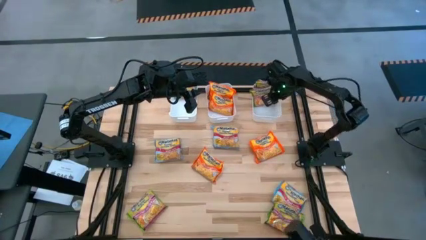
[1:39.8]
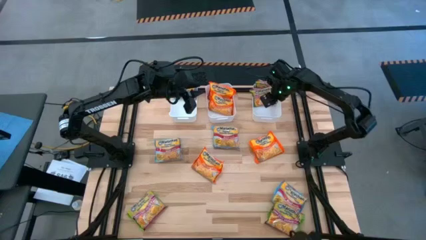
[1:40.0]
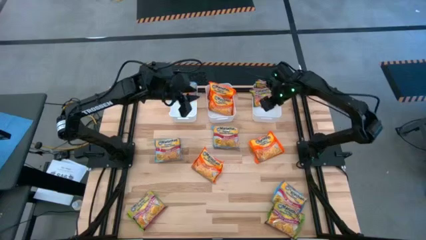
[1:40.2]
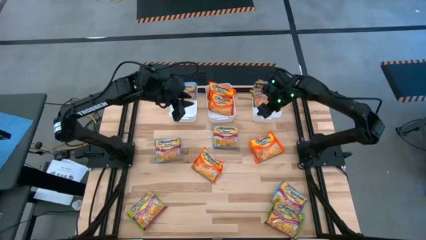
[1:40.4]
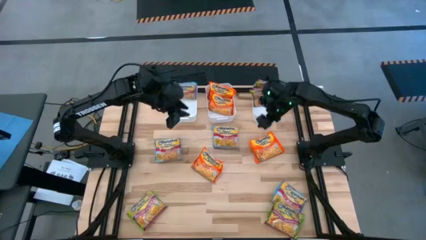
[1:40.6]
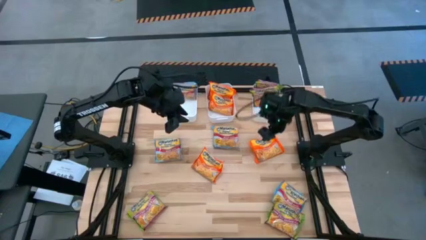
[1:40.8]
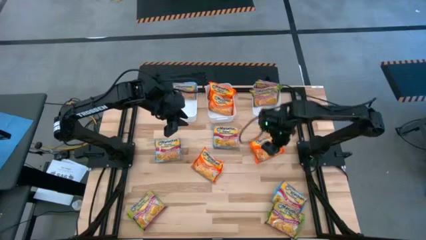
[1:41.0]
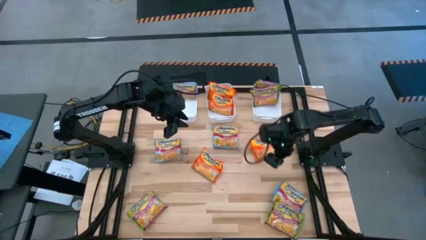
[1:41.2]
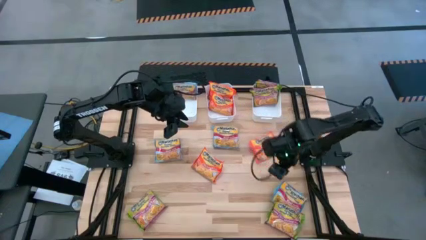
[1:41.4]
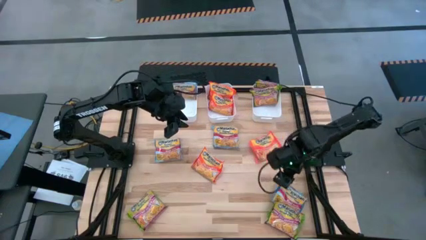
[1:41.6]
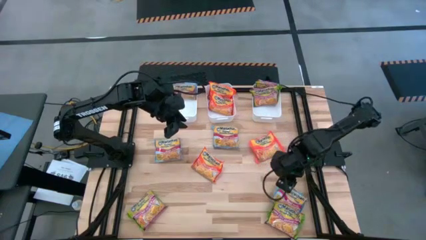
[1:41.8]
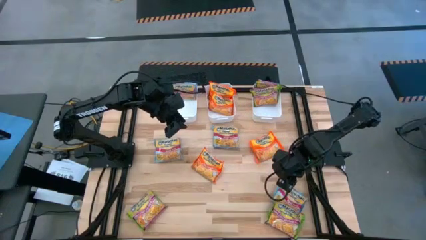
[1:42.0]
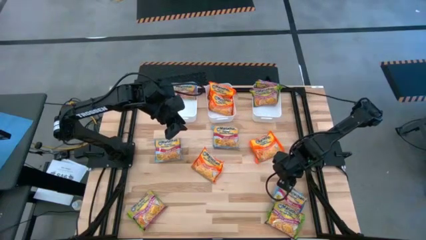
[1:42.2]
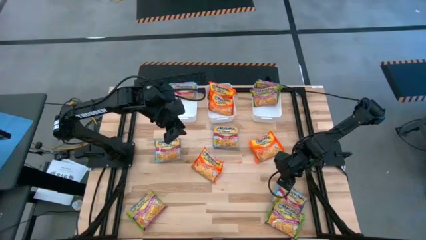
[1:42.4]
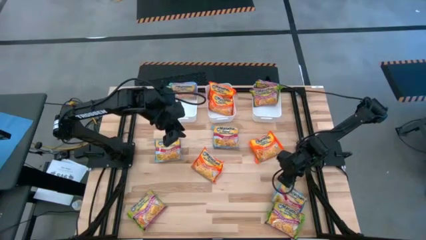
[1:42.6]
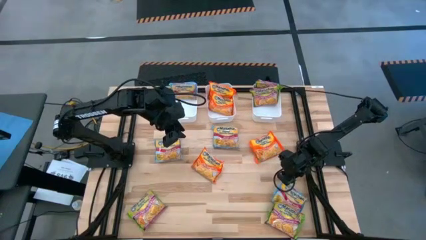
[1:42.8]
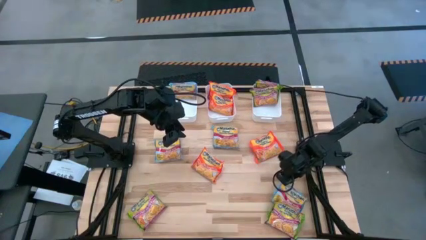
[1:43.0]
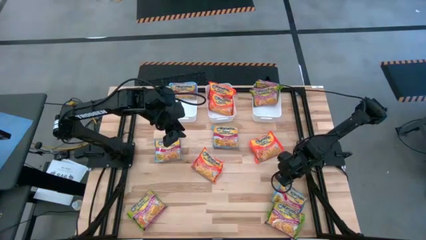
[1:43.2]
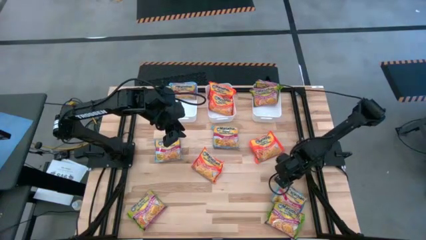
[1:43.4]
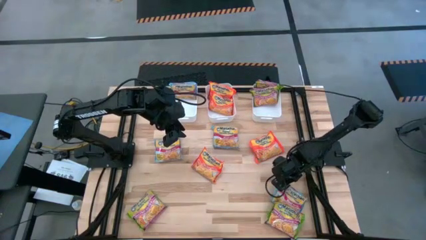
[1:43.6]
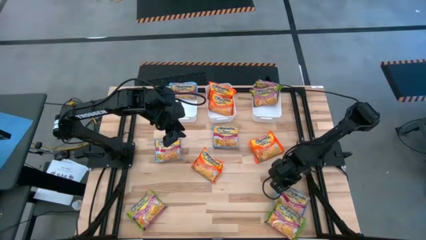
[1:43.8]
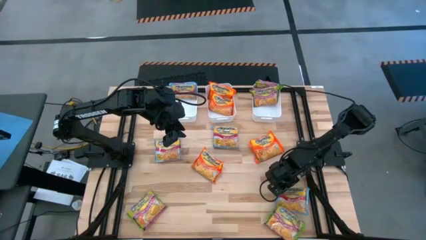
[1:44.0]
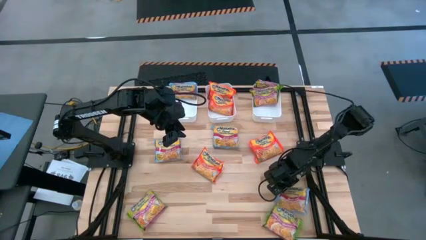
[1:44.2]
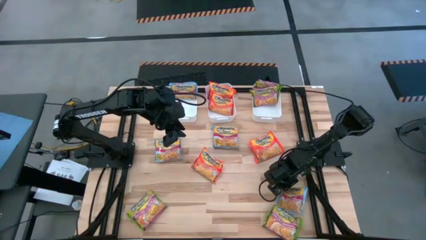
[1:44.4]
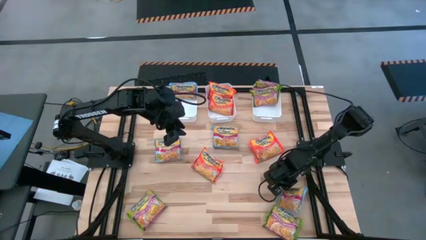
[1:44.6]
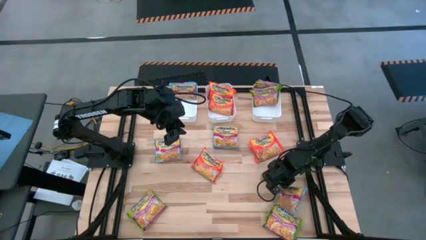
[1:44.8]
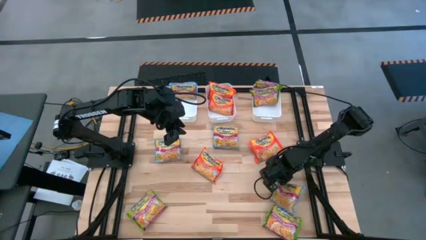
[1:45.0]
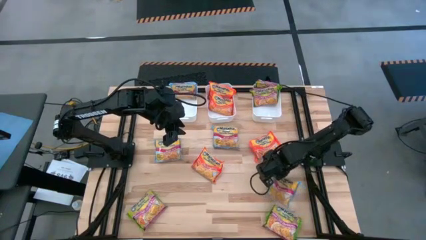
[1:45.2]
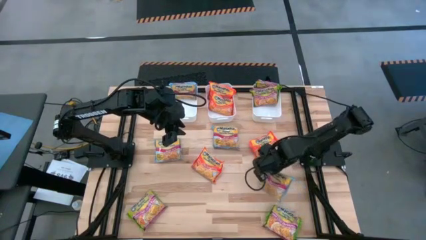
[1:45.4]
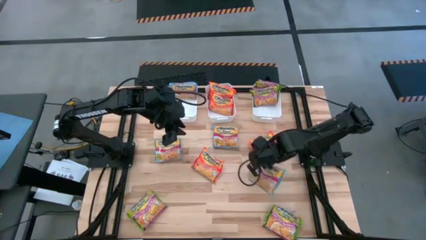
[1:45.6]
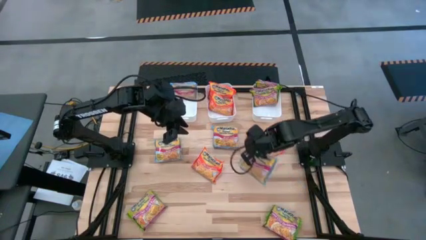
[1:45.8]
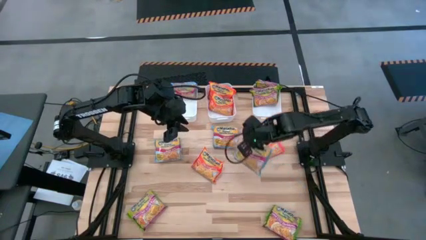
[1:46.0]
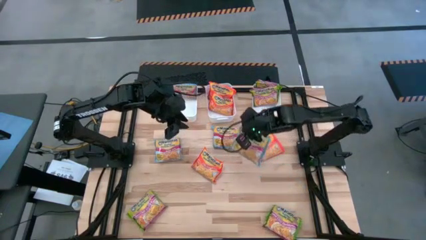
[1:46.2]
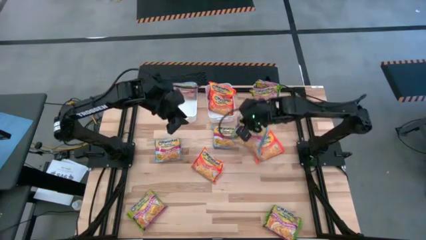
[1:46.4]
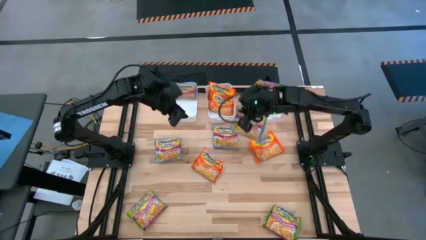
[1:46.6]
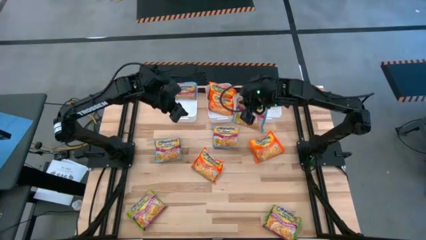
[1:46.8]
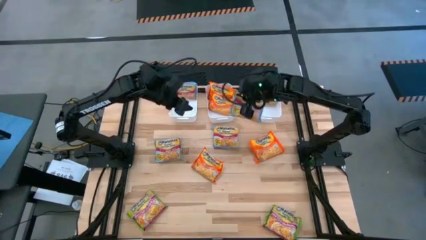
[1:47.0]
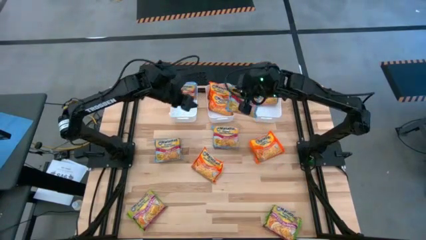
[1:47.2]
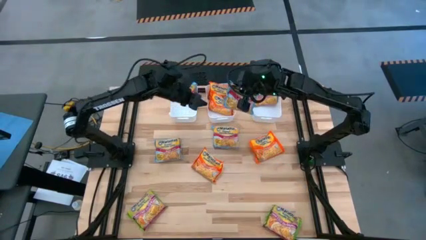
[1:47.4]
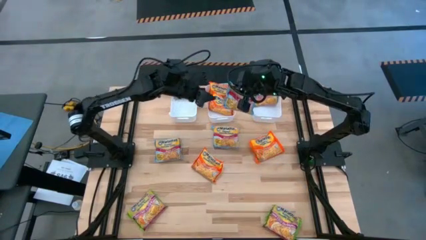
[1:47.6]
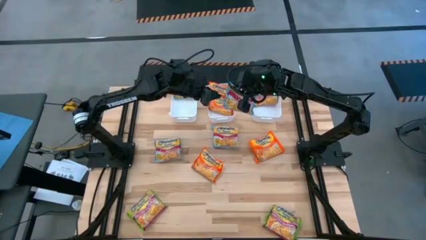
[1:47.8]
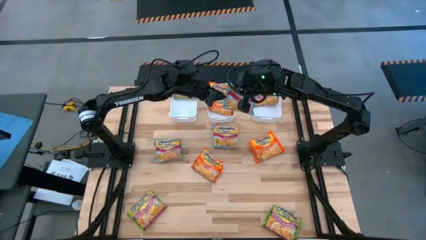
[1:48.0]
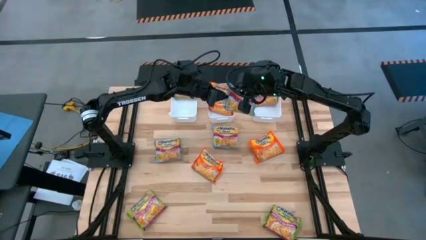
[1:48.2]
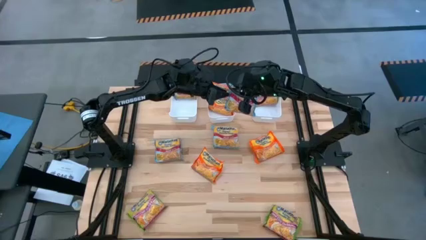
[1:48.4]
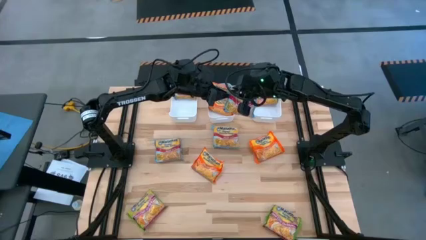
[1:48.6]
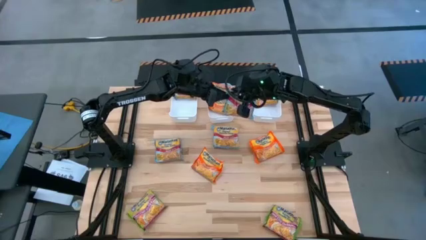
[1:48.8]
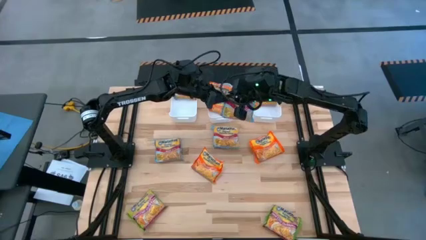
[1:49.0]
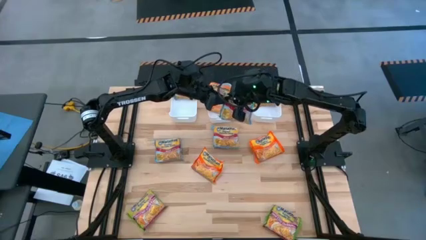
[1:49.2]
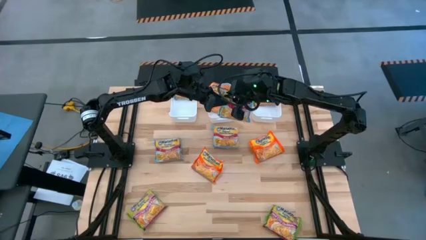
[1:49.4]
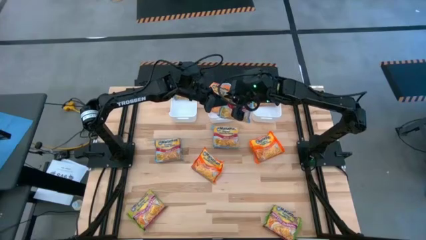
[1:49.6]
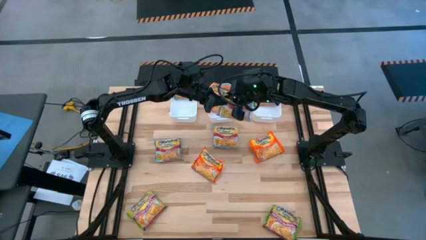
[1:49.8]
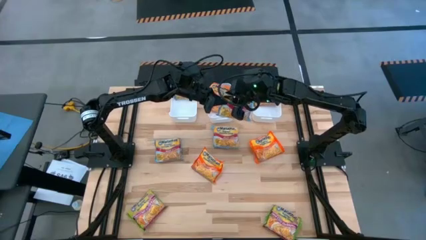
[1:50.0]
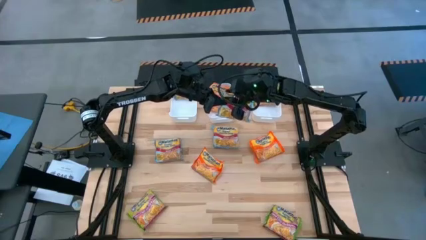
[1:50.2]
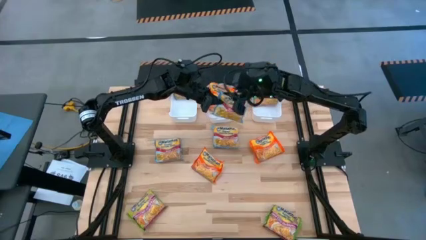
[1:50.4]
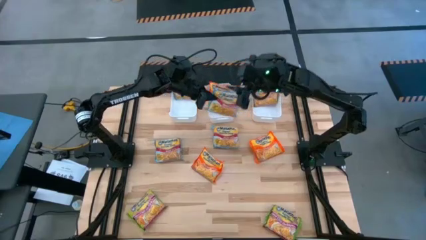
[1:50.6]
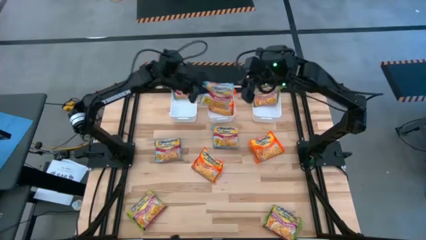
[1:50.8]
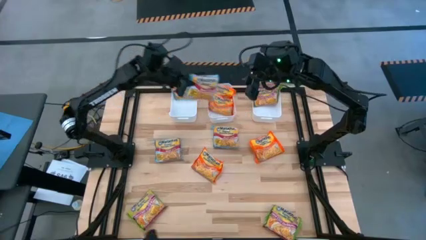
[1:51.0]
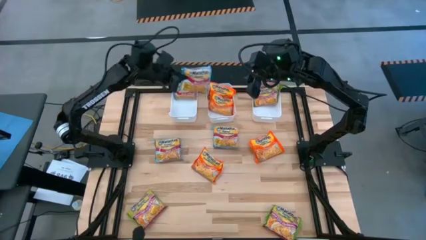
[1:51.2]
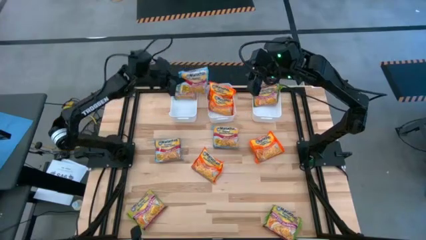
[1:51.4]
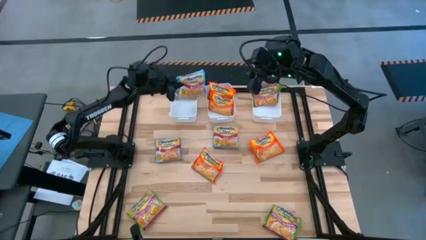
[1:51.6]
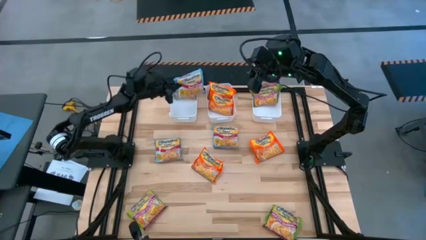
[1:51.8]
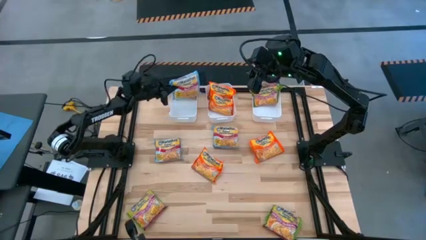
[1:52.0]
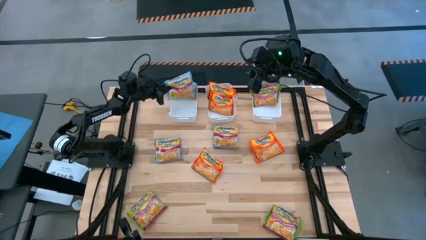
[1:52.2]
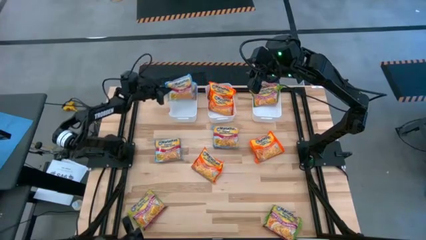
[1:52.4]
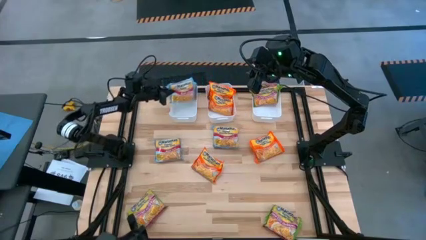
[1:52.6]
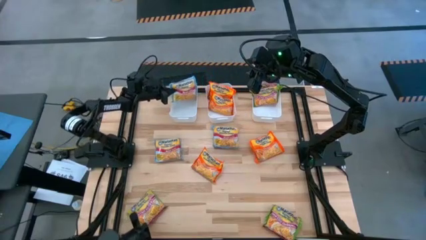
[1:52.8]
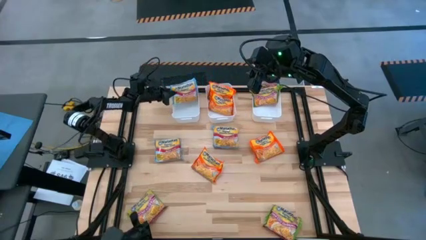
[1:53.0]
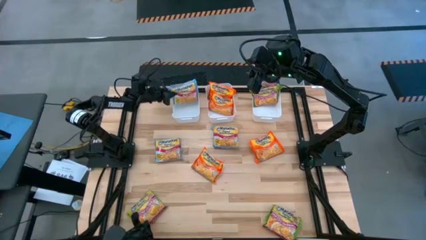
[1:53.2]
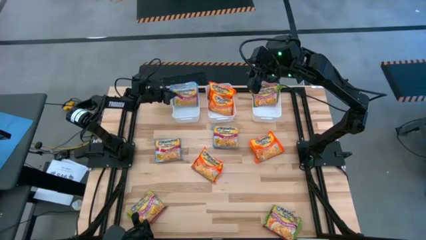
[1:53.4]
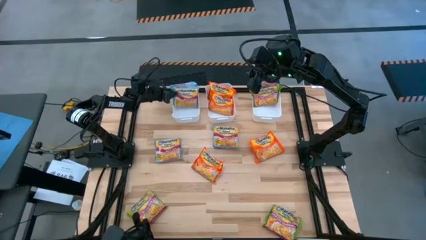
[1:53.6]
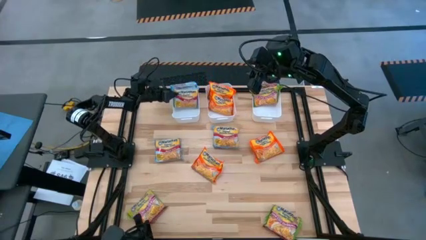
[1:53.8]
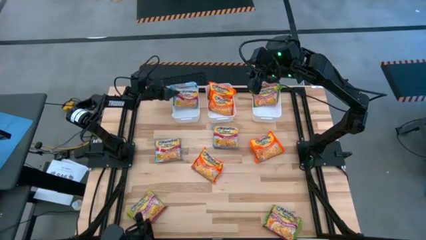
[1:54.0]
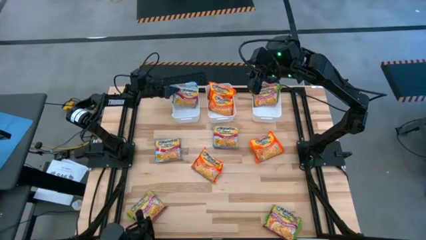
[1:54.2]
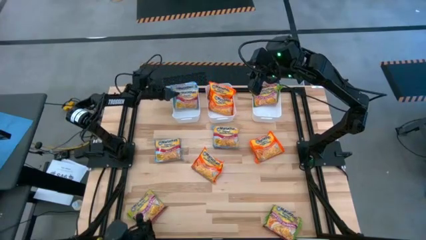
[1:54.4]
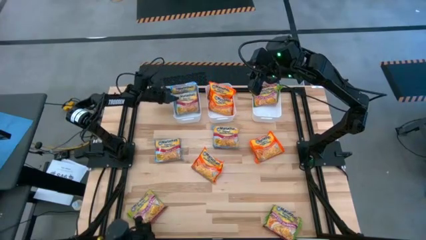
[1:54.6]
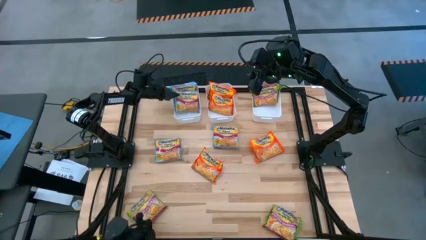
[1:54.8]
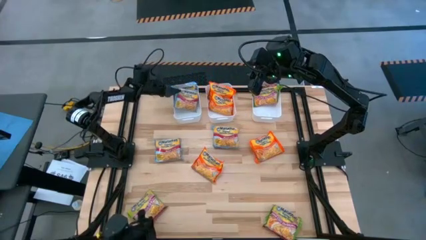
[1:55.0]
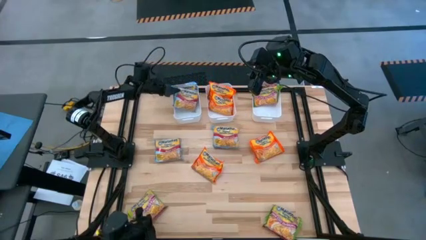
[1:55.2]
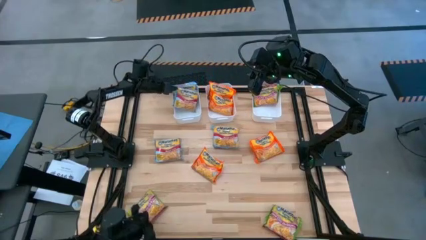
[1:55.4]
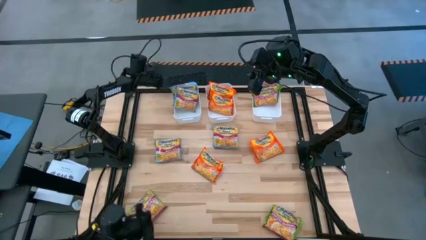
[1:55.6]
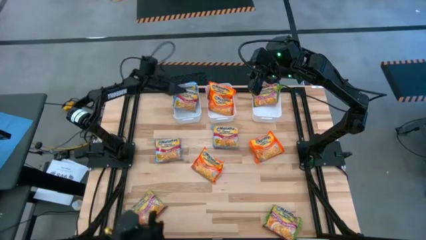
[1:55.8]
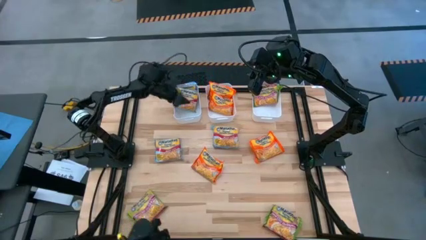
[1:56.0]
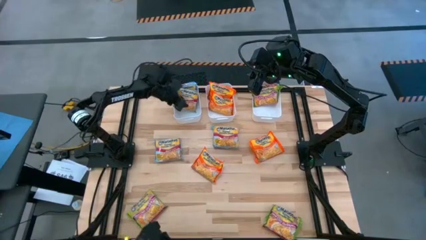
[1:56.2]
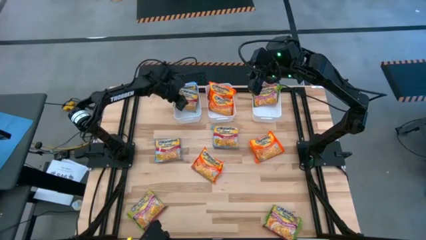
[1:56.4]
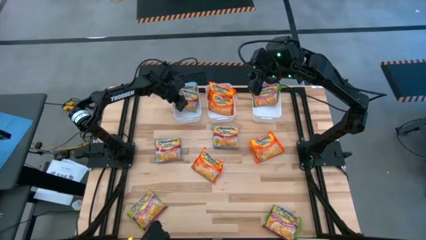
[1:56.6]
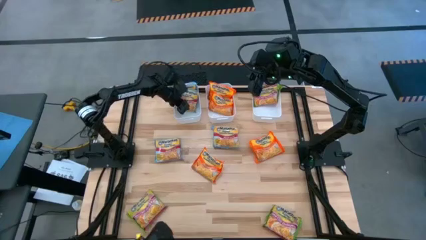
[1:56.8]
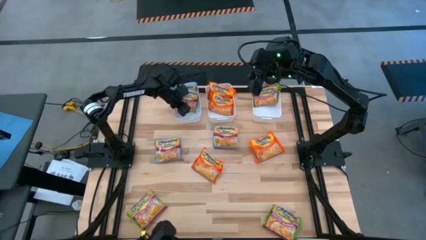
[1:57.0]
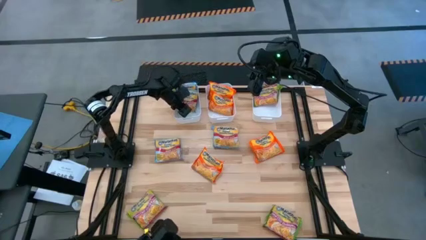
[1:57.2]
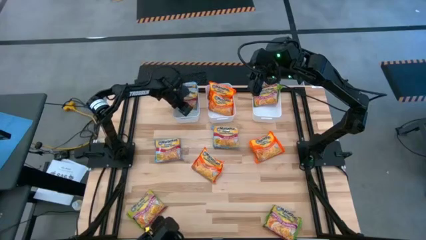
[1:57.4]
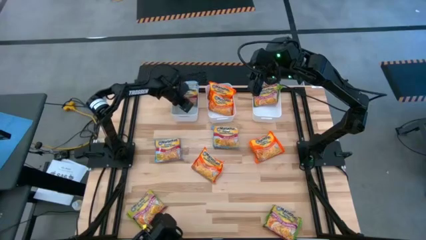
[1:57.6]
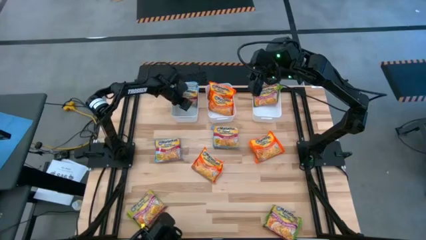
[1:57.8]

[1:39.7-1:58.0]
Task: Sort Maruchan noodles
Put the blue noodle pack into the left white bin
